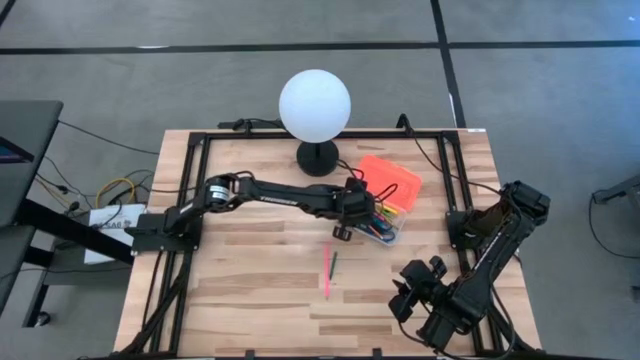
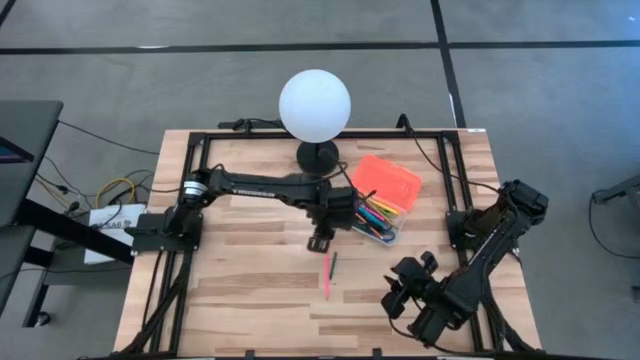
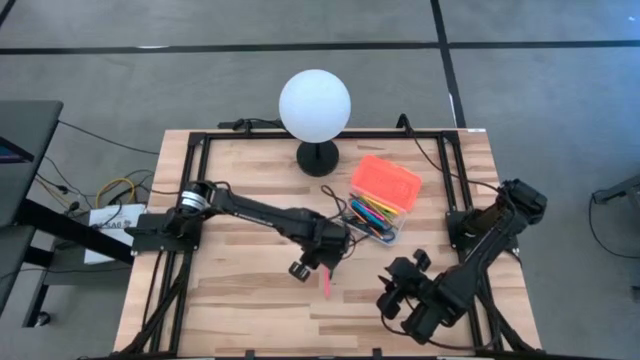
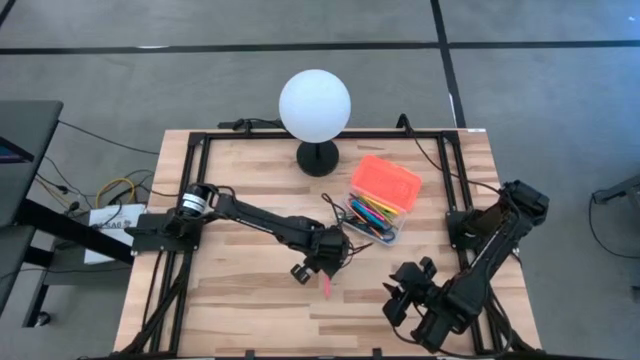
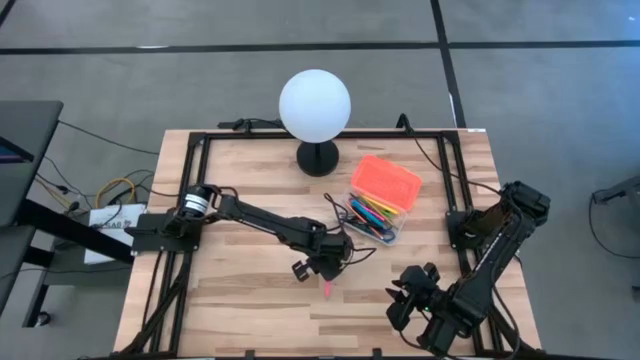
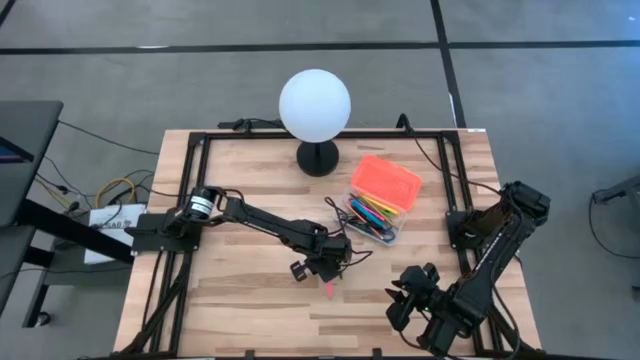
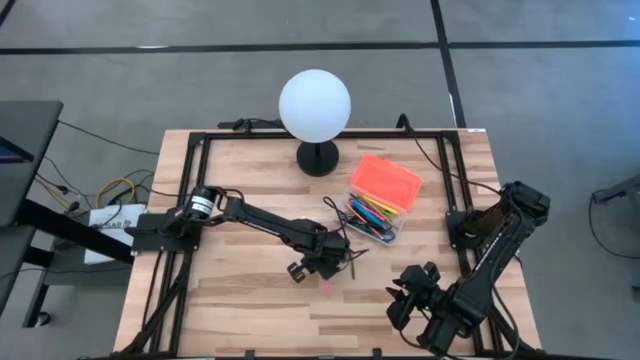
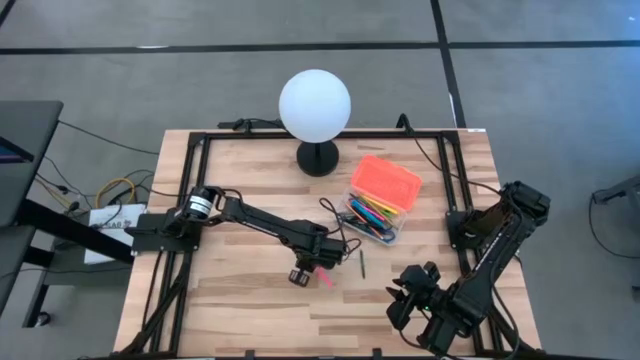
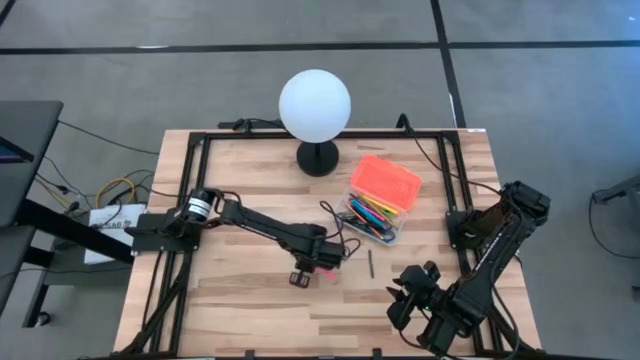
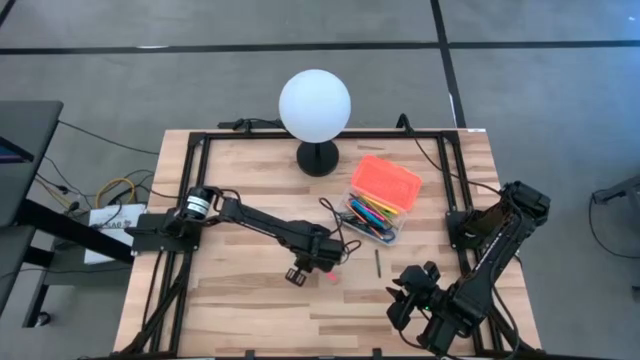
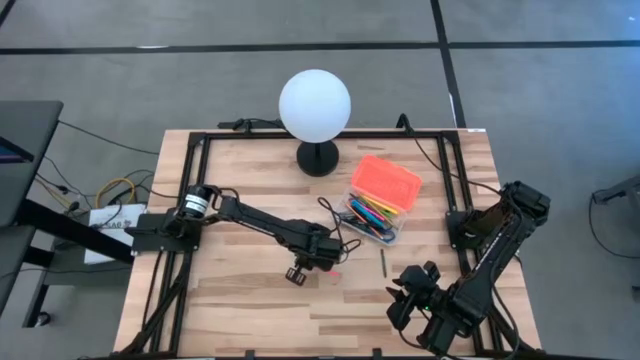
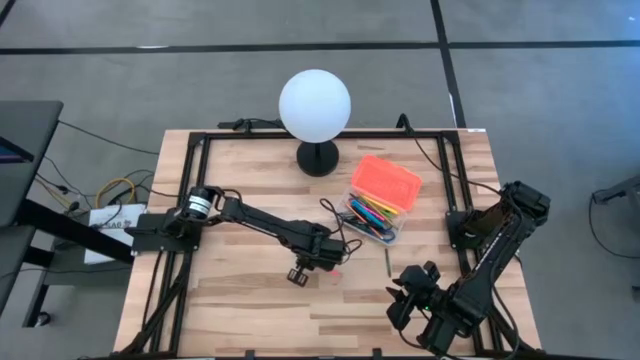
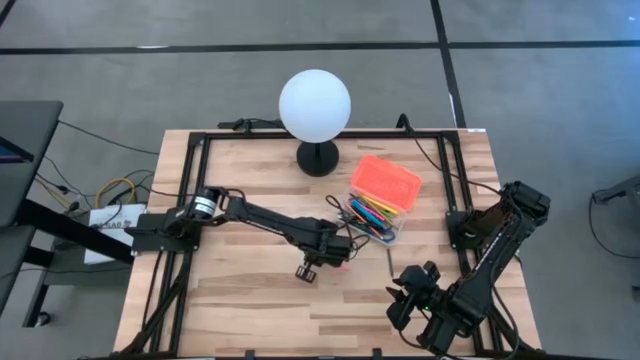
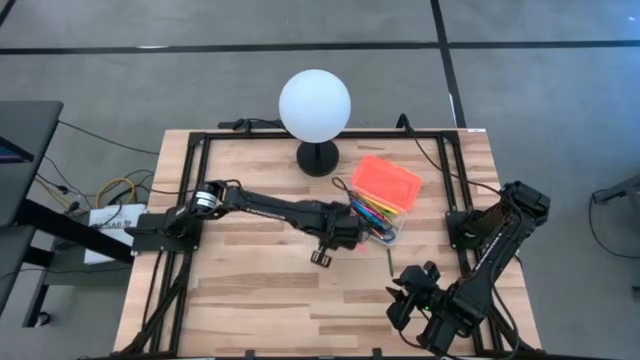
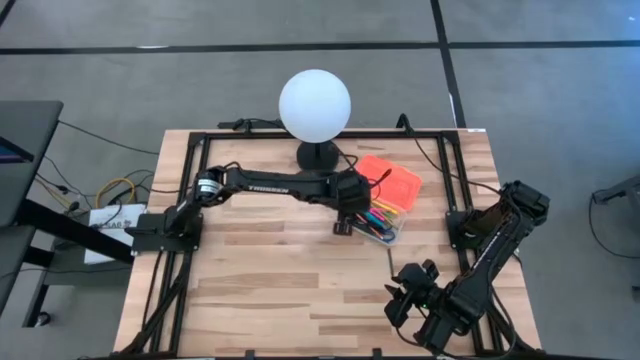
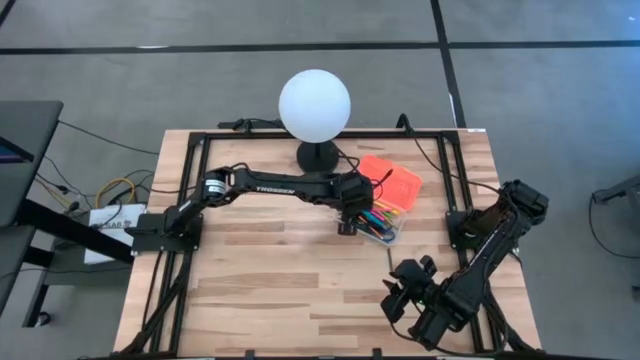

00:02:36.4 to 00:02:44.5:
Task: Pick & place school supplies into a supply box
Put the pink pencil into the orange supply box

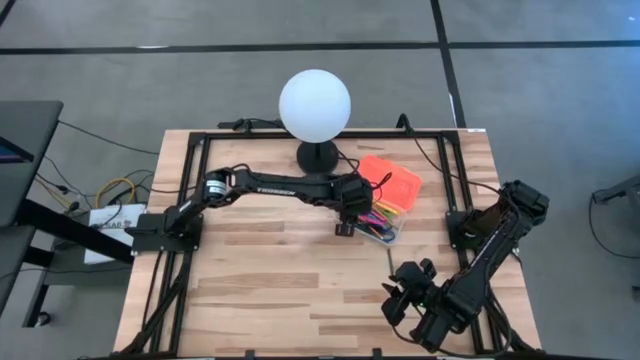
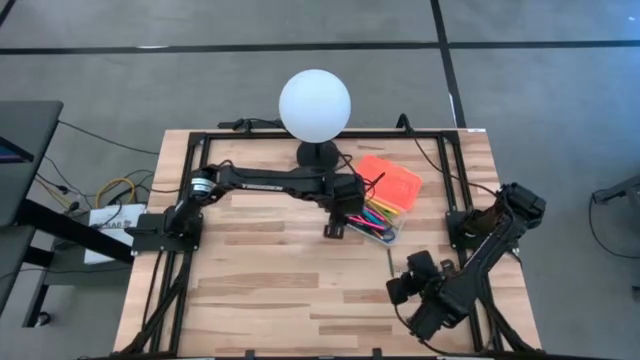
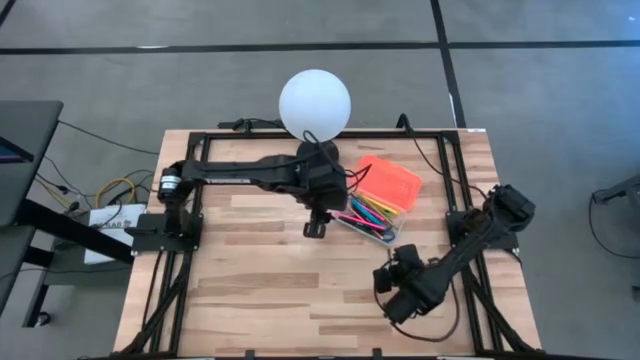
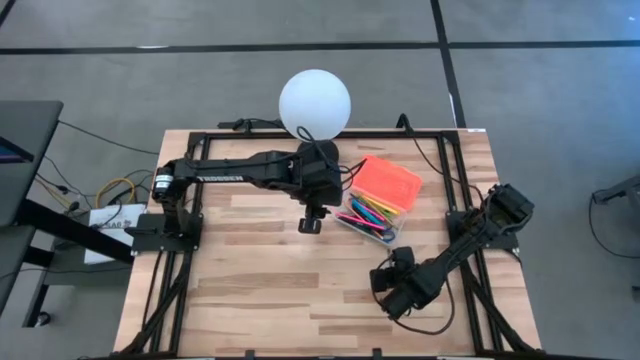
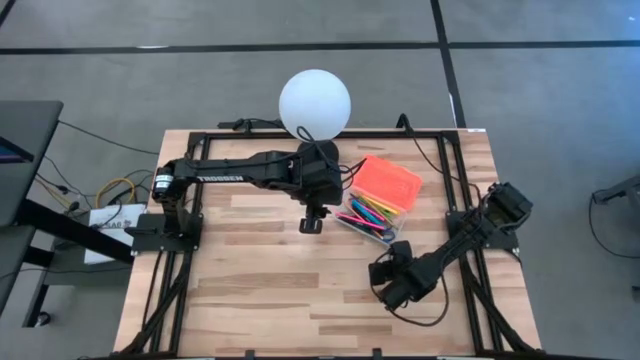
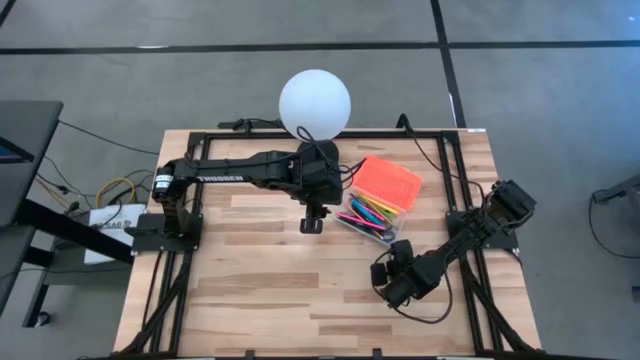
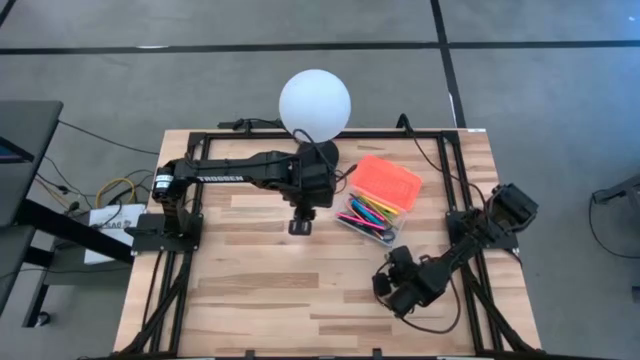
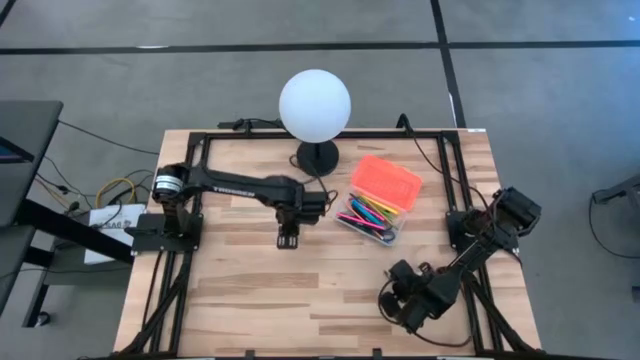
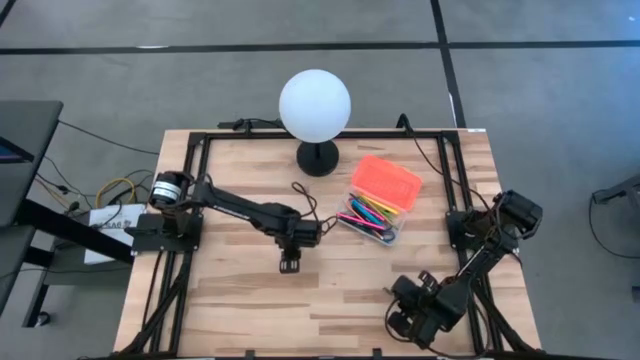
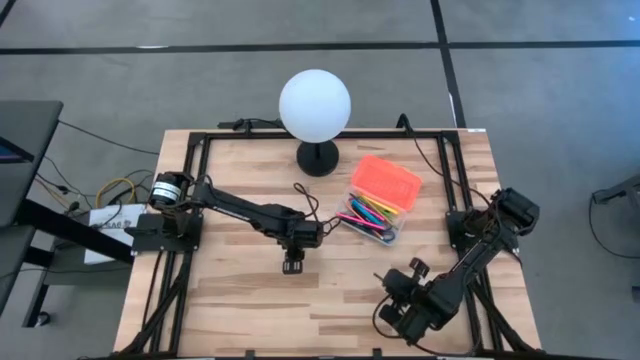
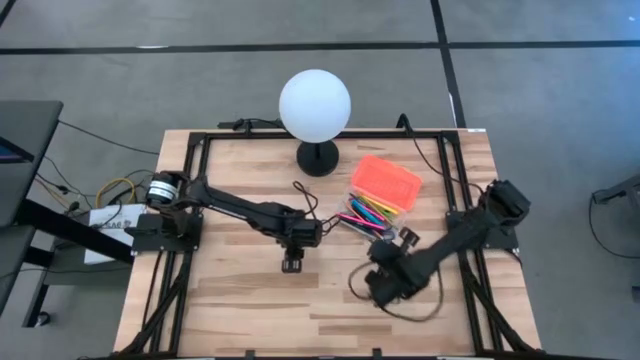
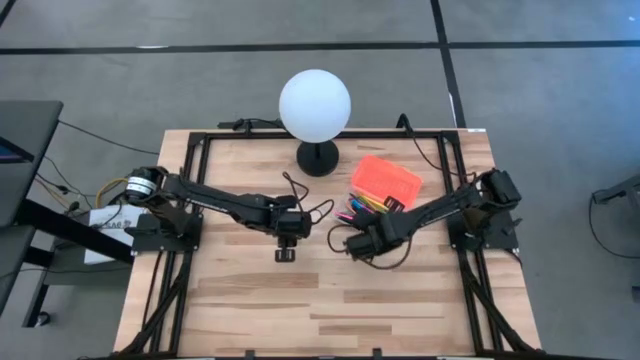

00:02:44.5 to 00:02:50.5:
Put the green crayon into the orange supply box

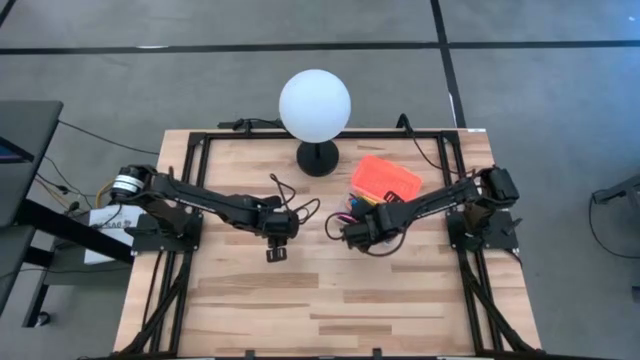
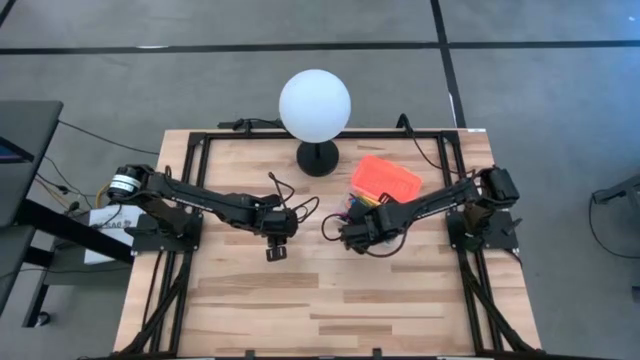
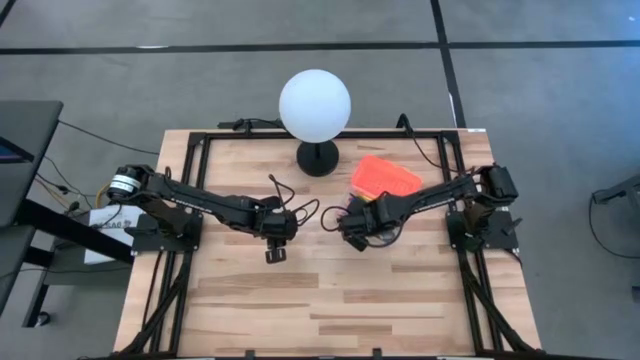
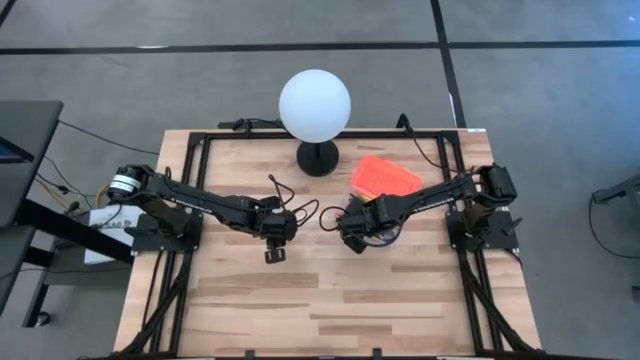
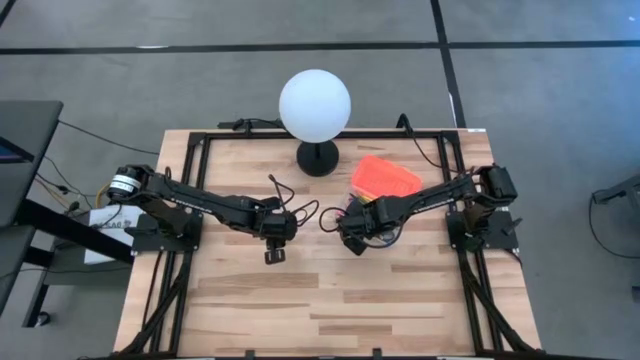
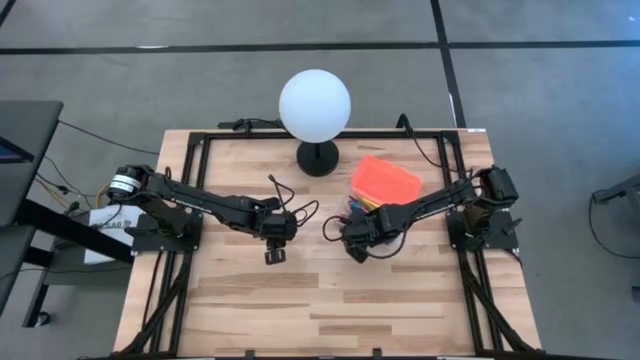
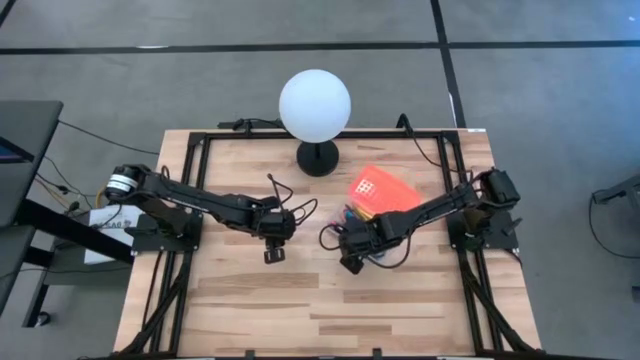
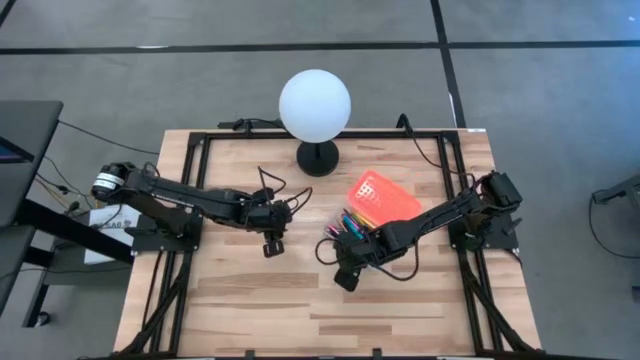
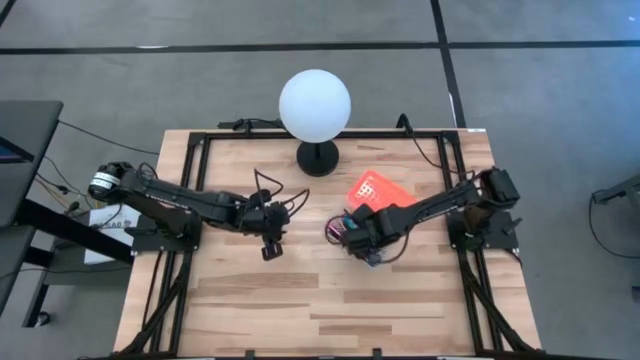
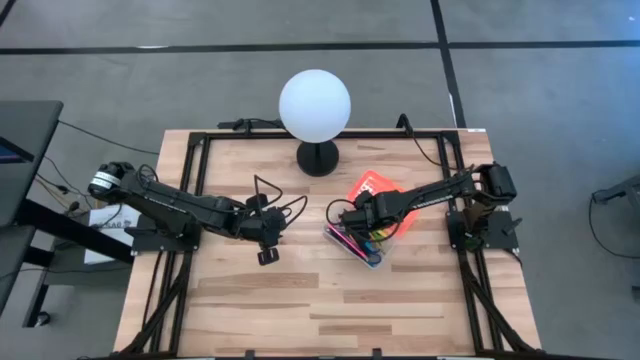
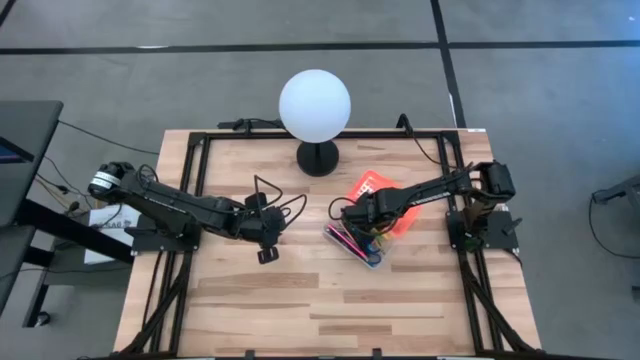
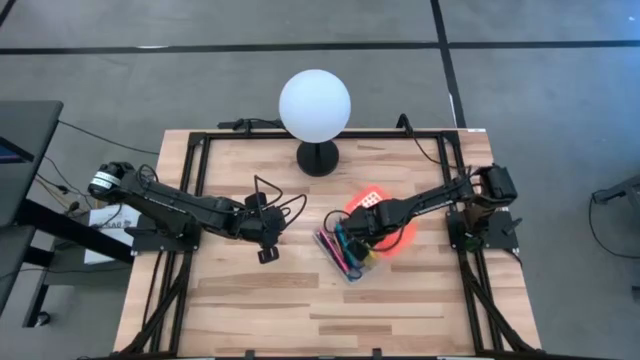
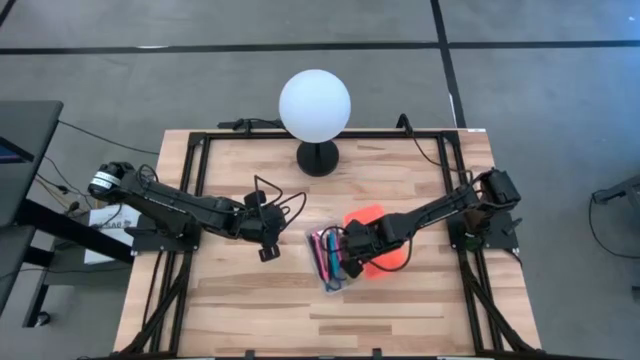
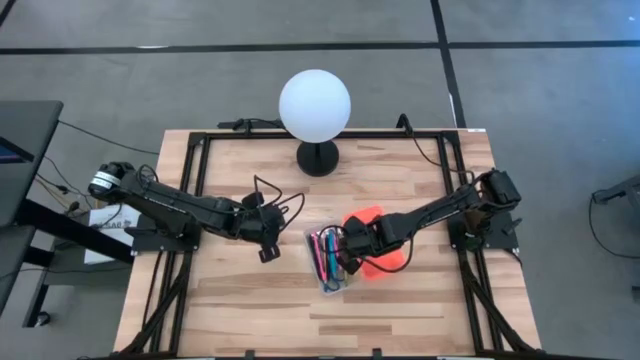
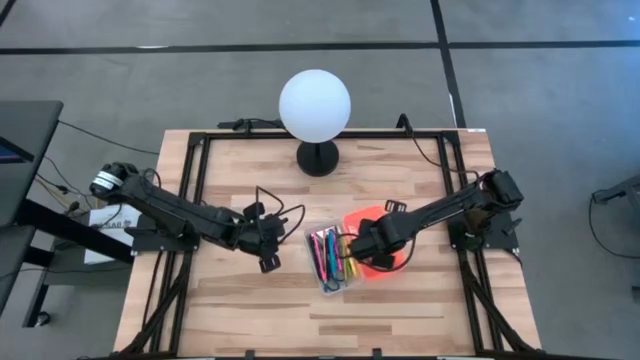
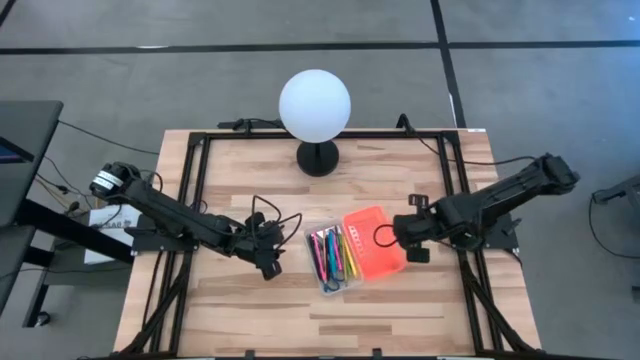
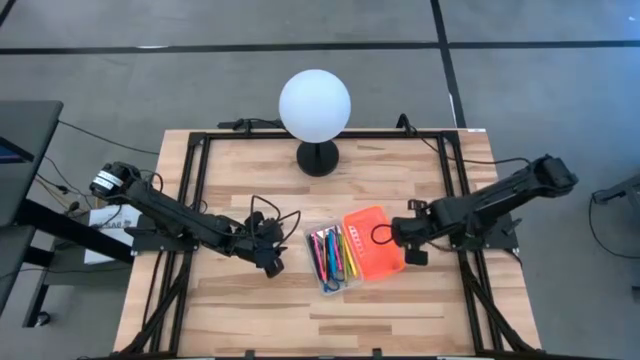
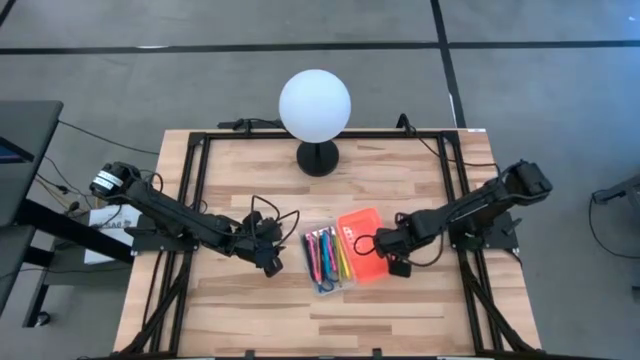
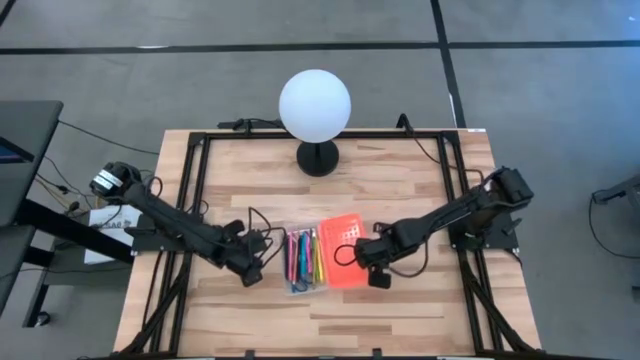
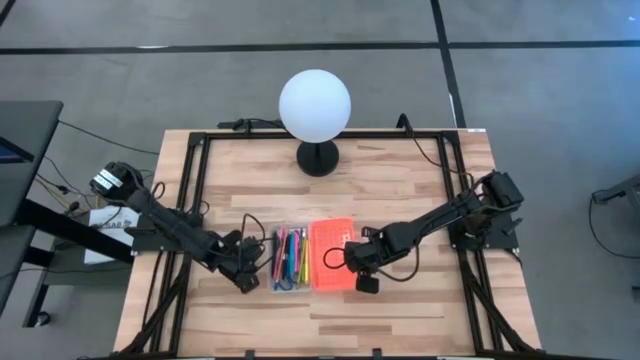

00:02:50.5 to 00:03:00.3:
Move the orange supply box to the center of the table
